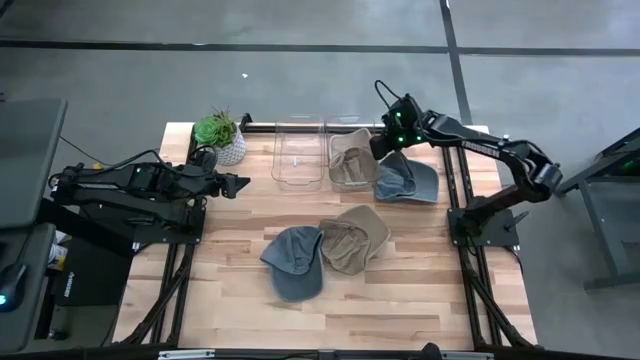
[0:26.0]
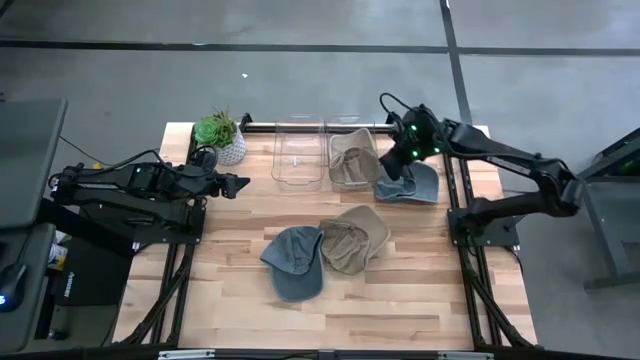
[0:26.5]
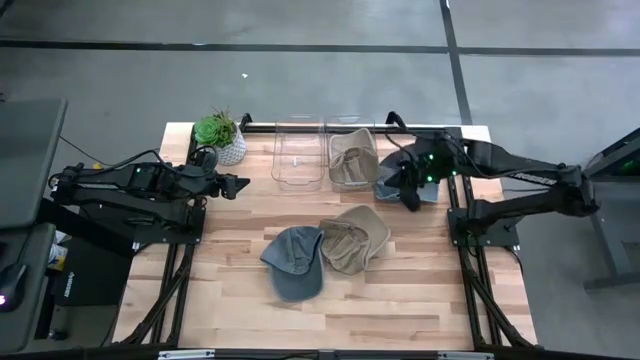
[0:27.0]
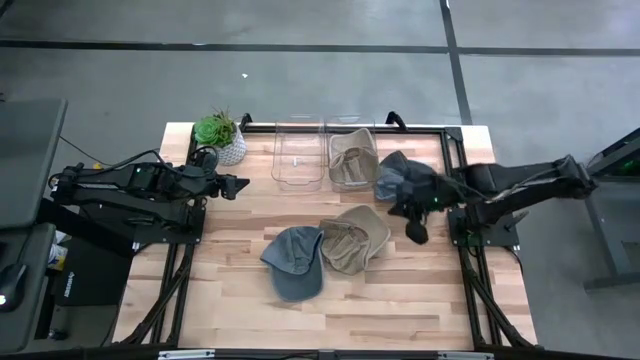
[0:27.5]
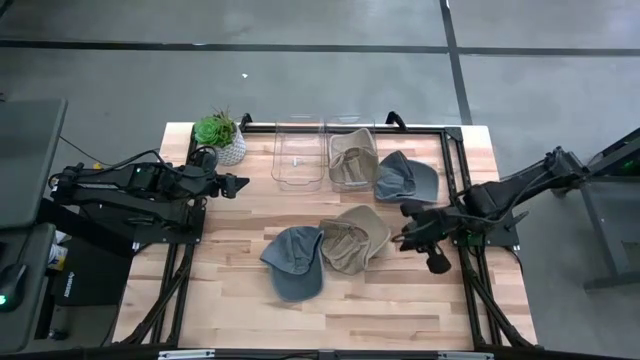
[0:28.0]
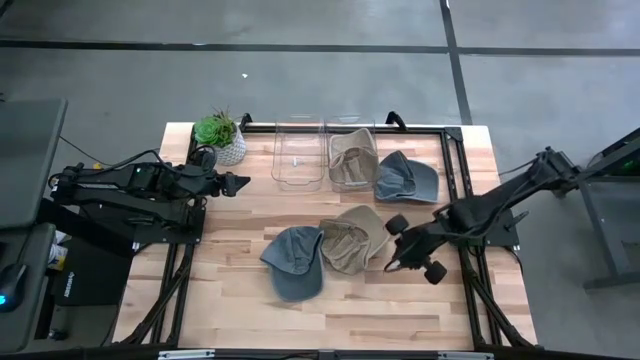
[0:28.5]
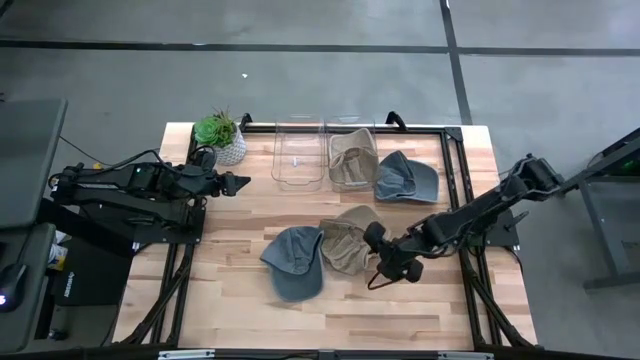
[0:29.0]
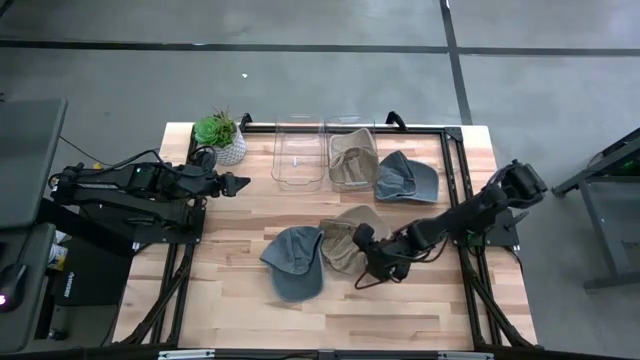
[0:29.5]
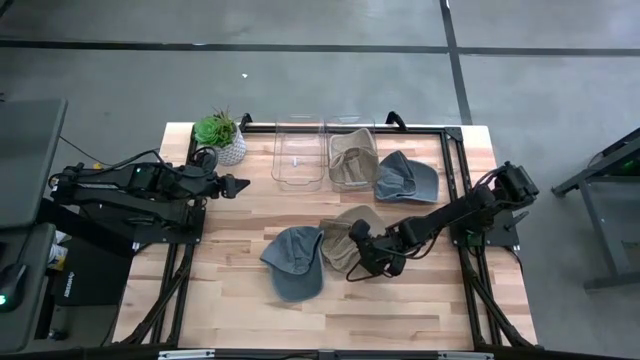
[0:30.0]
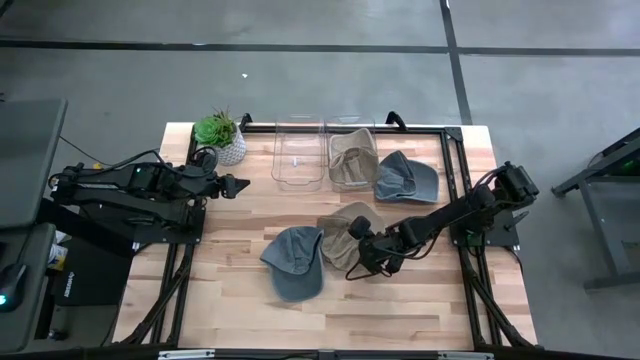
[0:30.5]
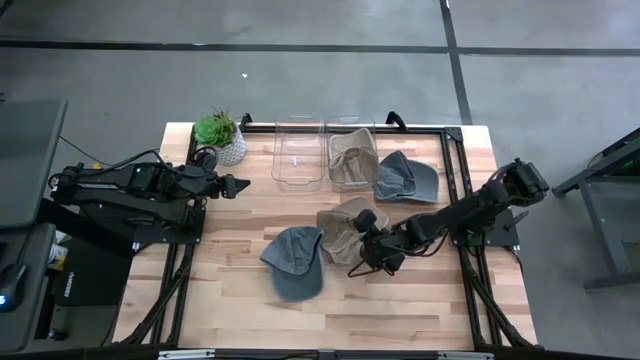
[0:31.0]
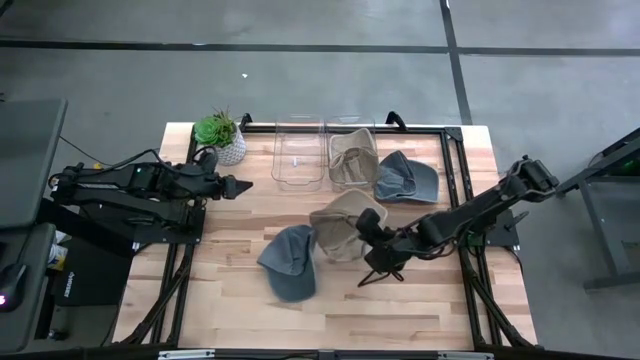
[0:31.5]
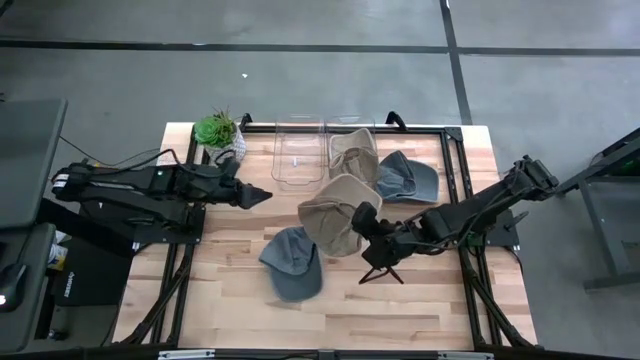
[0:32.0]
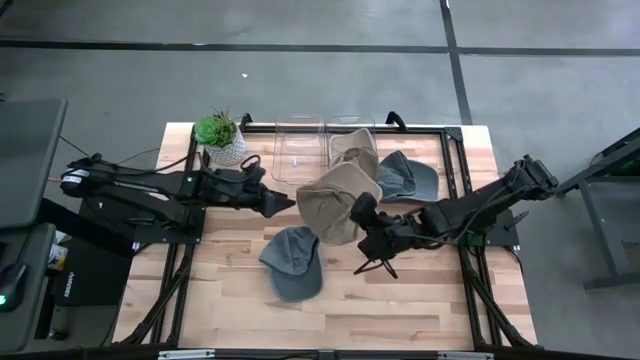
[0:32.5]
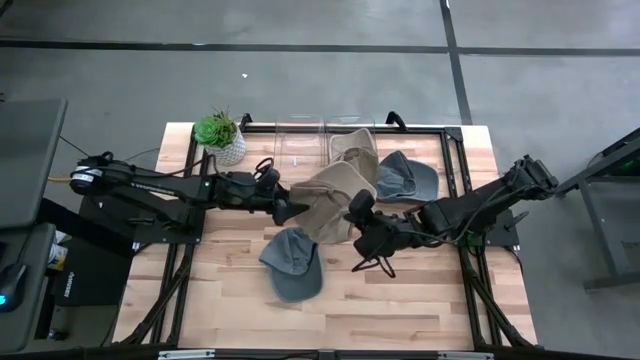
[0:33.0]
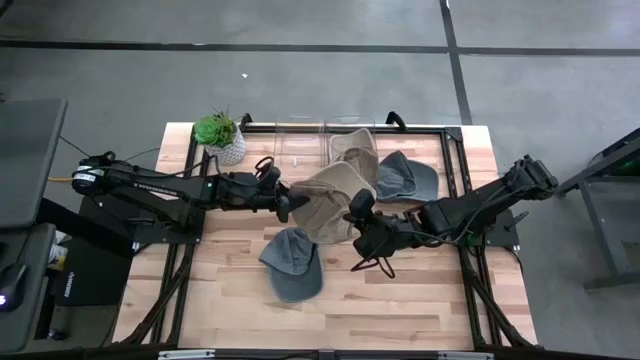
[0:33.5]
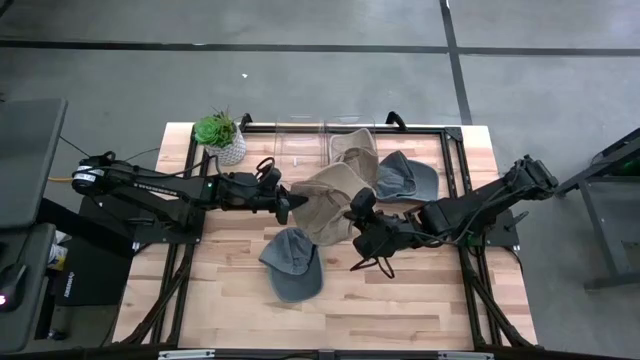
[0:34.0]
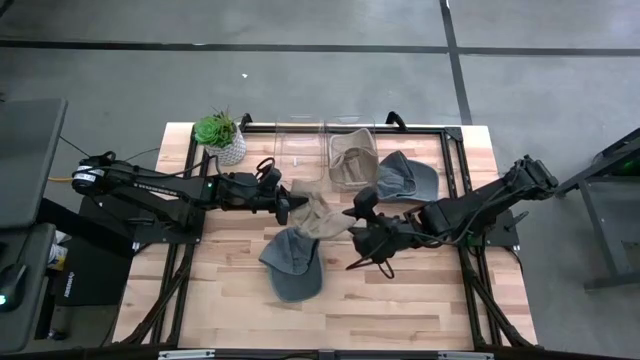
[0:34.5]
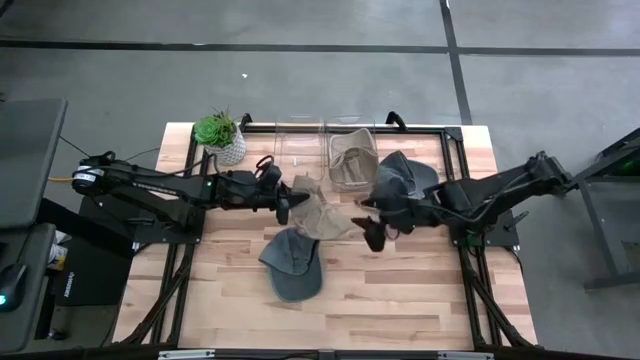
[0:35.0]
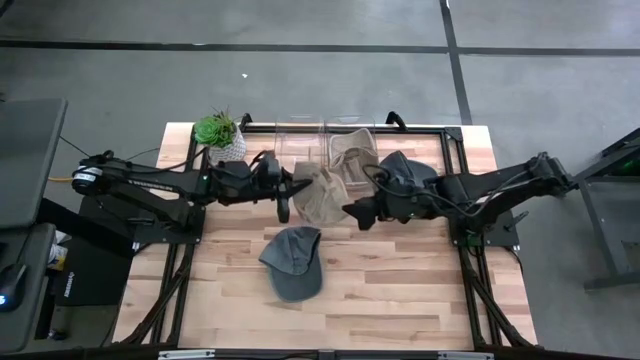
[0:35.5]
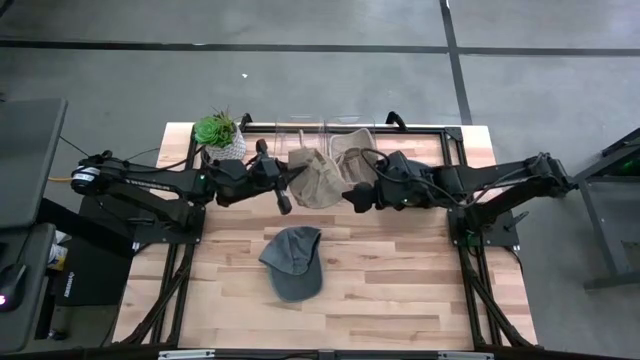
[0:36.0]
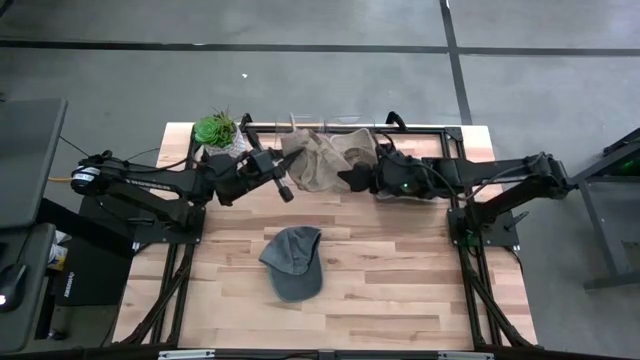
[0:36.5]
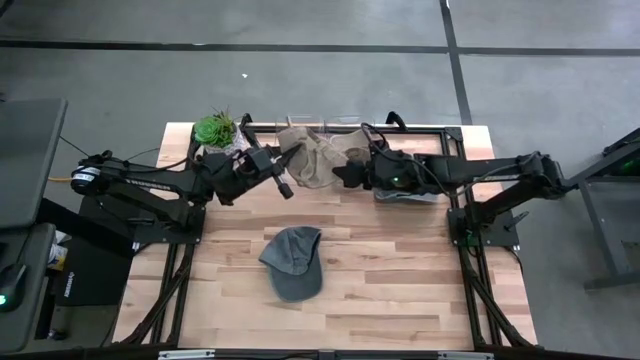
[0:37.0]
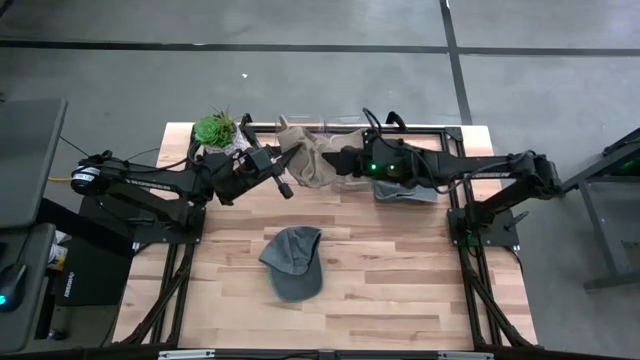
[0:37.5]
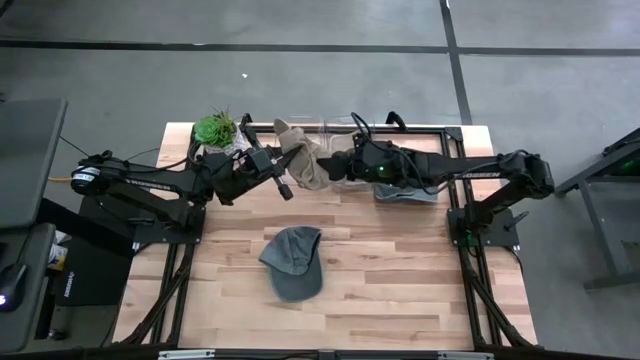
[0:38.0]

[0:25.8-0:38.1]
Task: Pick & Place hat
Put the brown cap into the right transparent bin

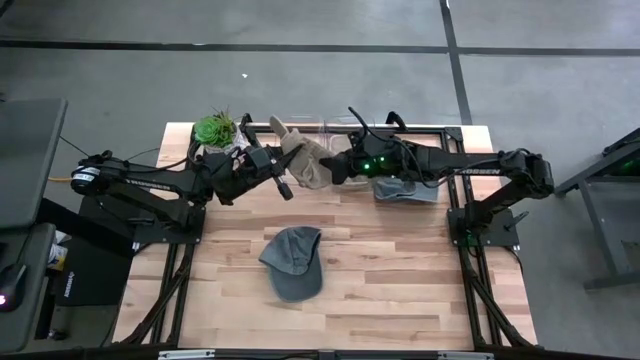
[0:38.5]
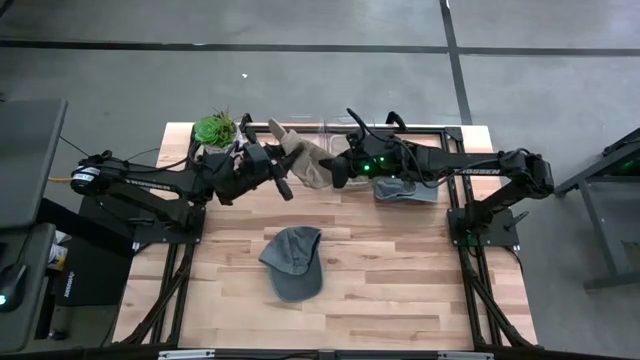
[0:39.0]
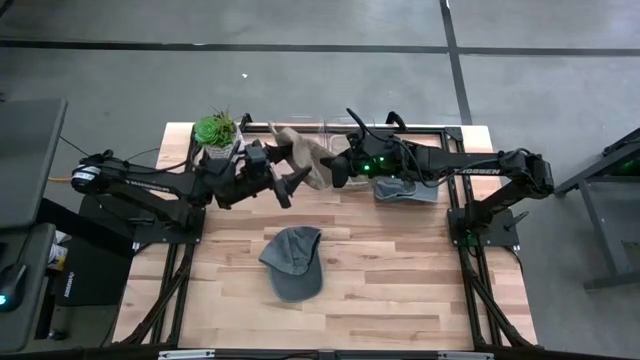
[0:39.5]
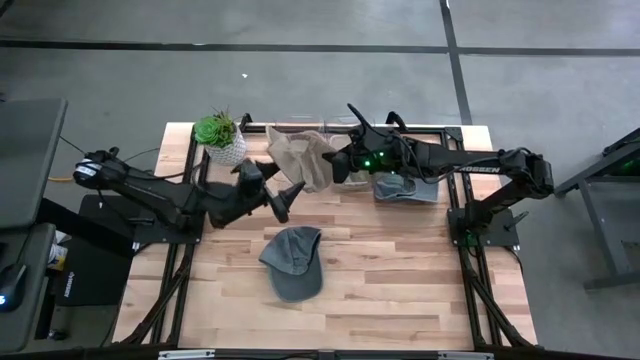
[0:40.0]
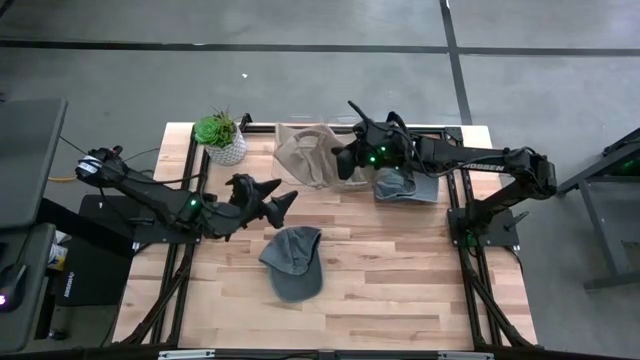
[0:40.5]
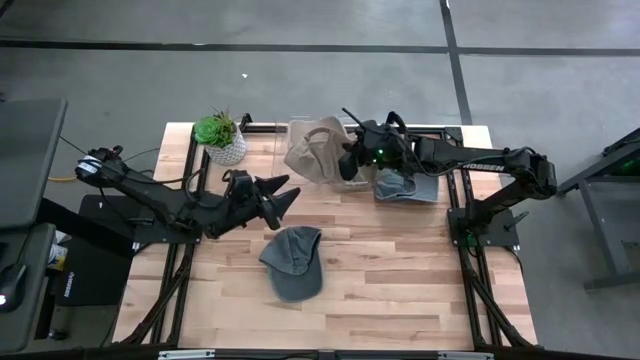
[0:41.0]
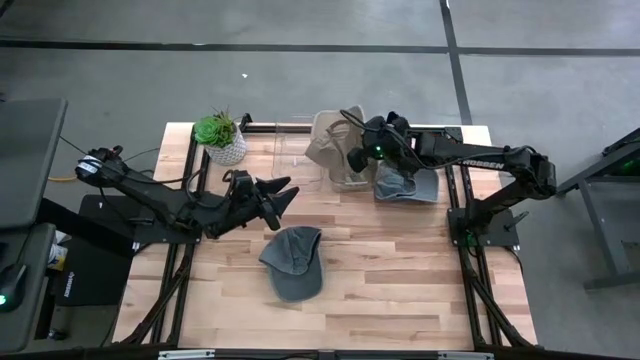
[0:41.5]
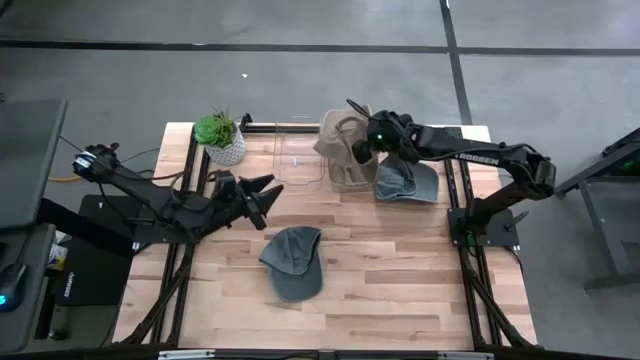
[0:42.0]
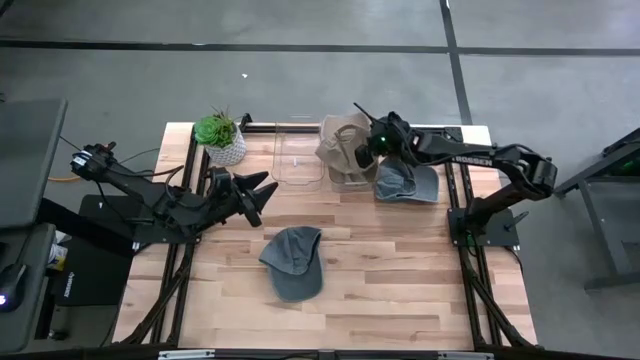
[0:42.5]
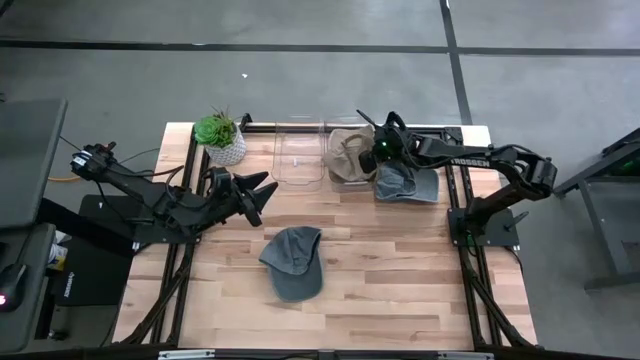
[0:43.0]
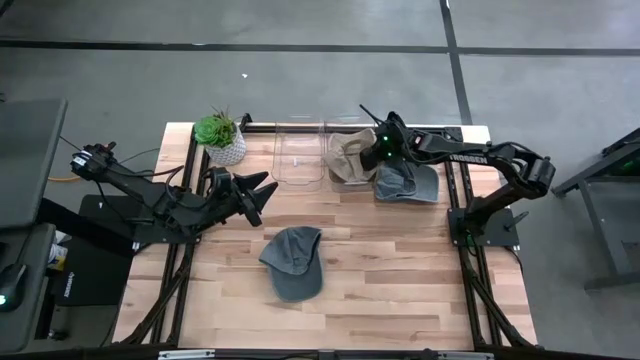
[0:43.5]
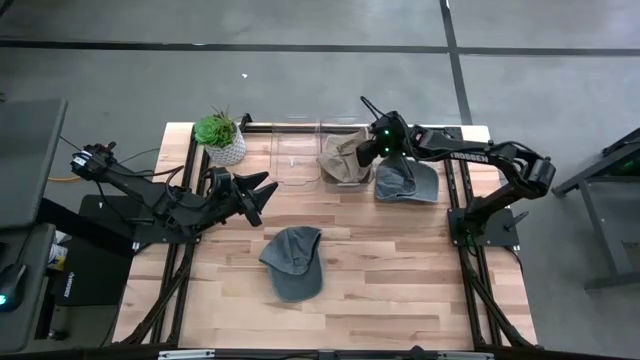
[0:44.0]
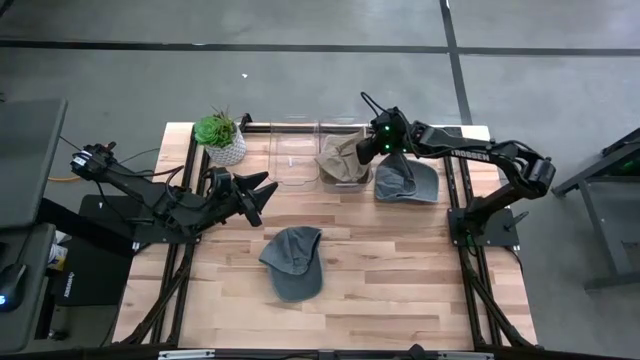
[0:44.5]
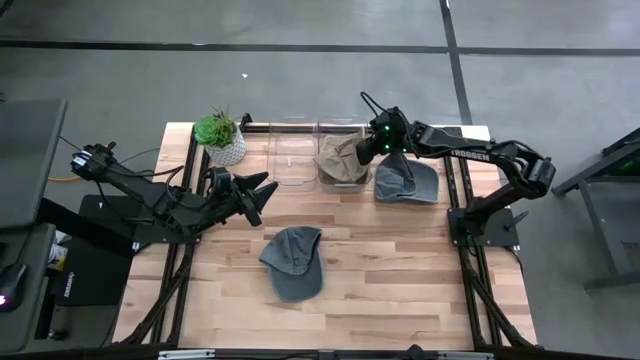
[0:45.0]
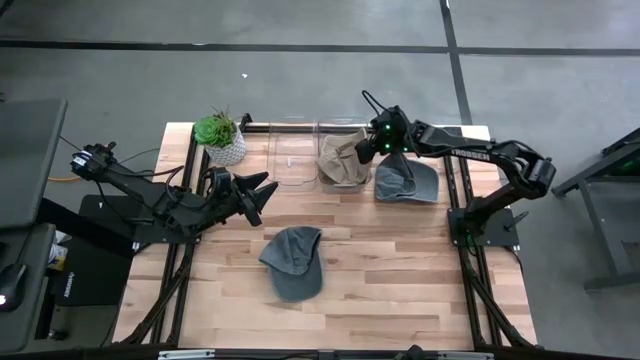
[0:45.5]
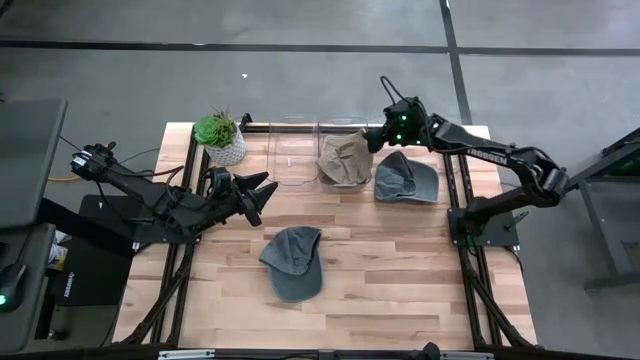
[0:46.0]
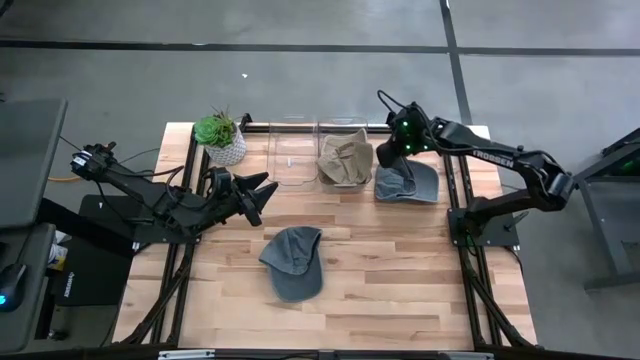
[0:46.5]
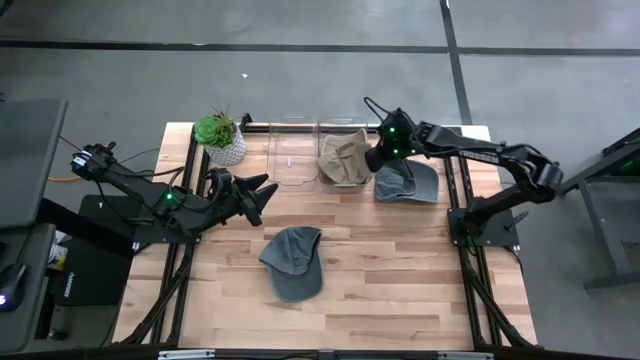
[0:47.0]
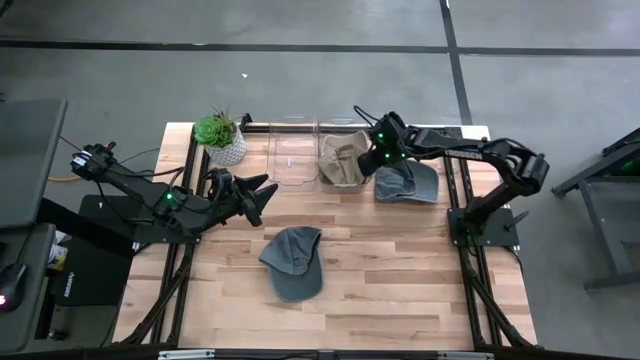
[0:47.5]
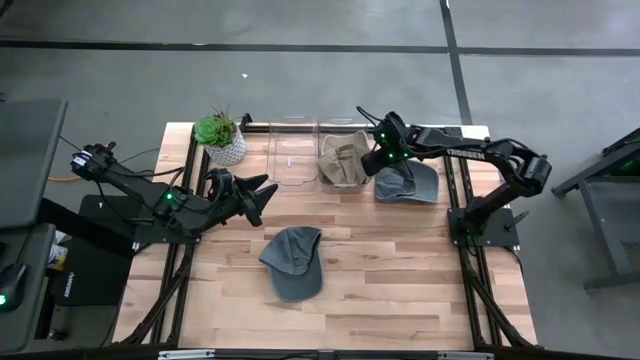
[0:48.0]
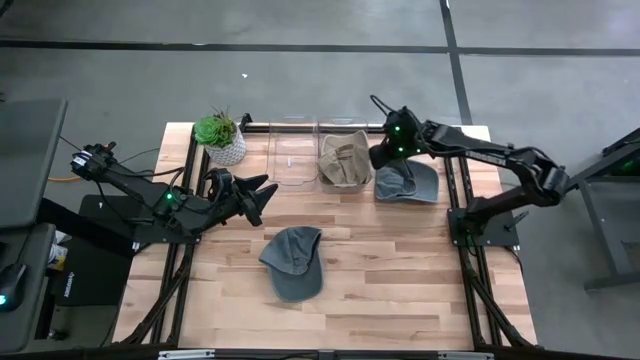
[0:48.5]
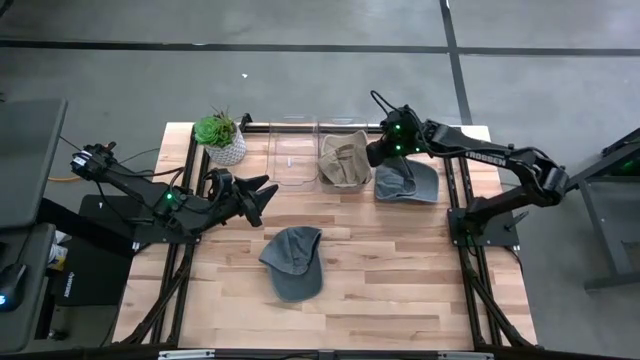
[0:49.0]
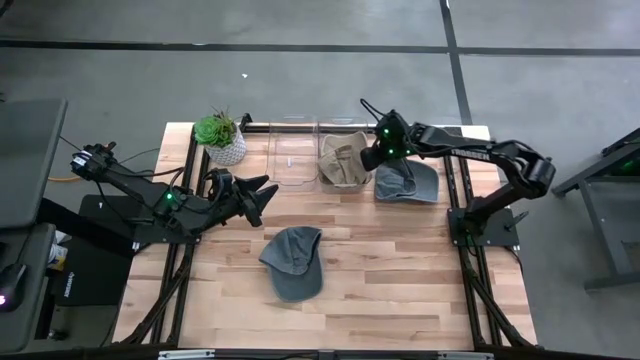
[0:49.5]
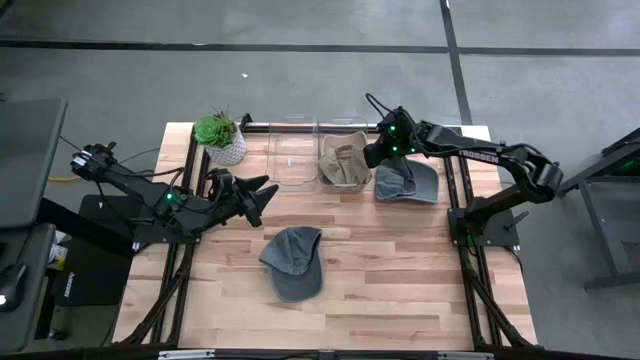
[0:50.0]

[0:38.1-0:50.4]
Put the brown cap into the right transparent bin
